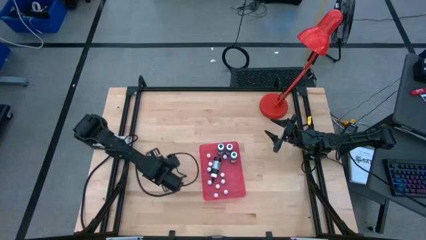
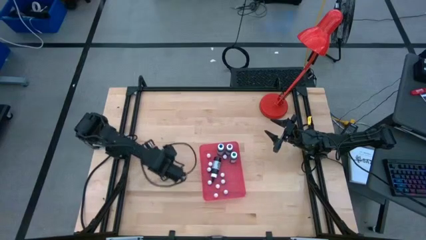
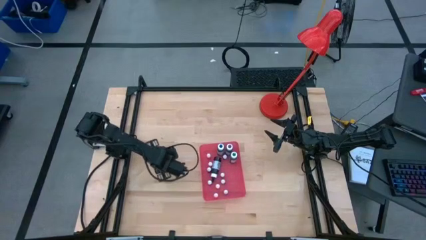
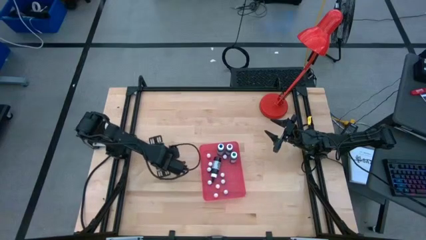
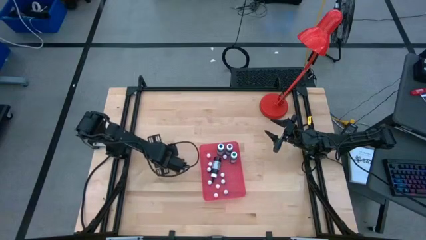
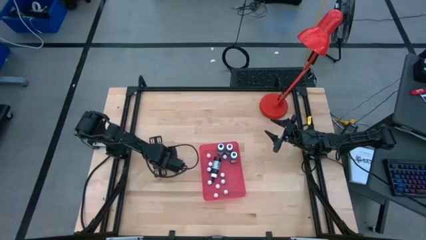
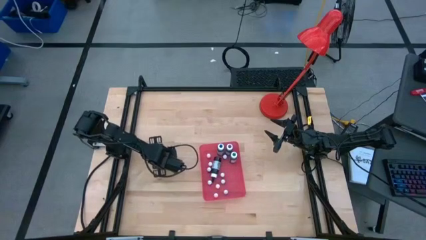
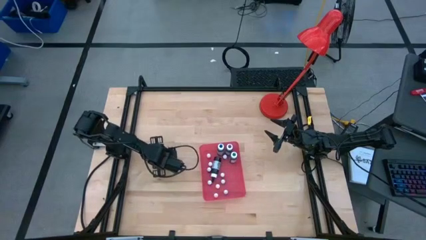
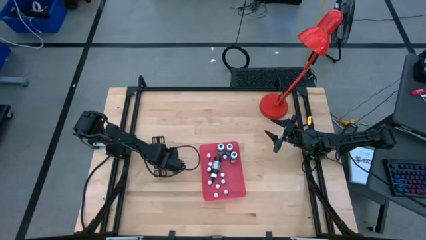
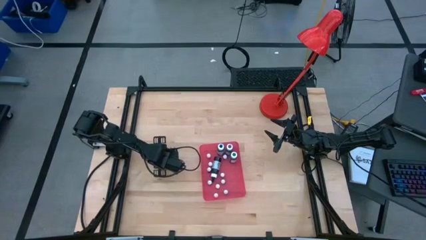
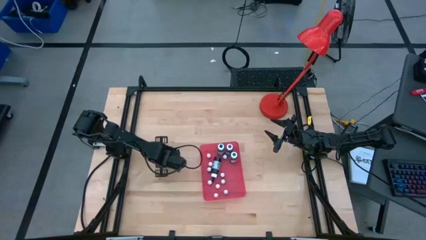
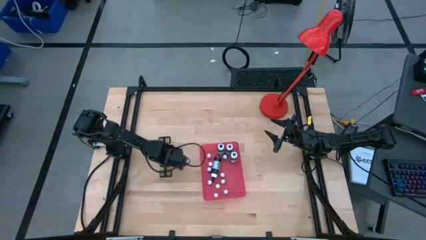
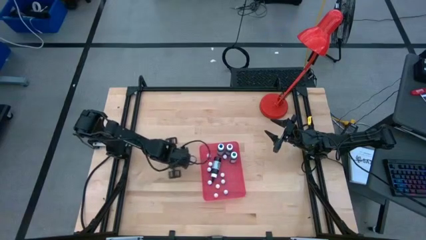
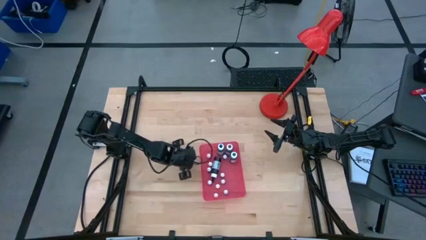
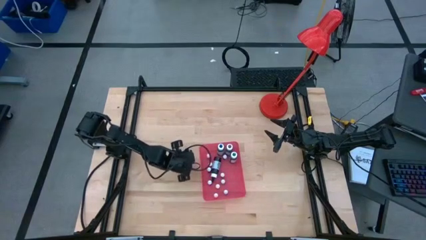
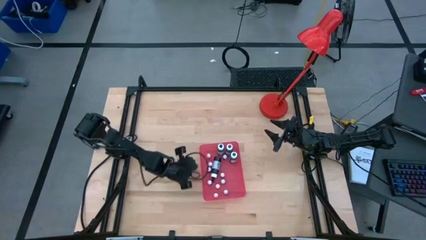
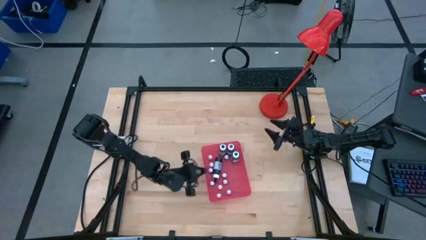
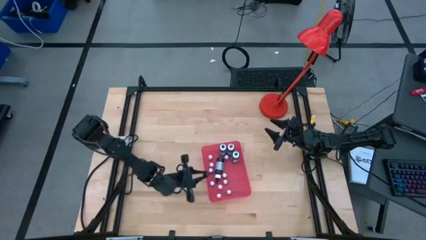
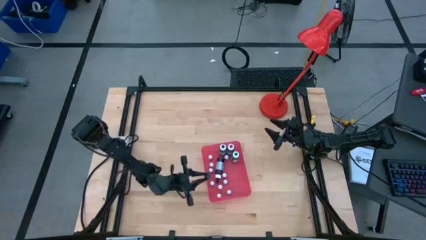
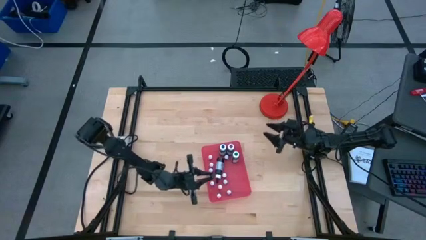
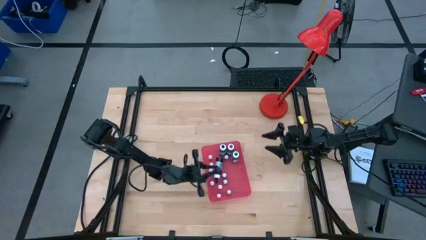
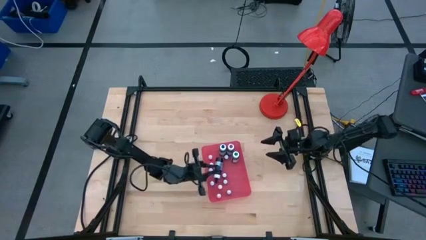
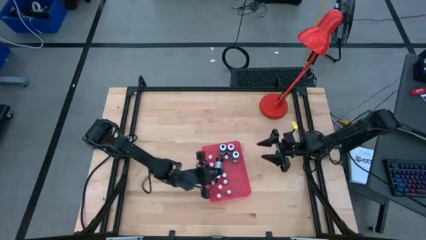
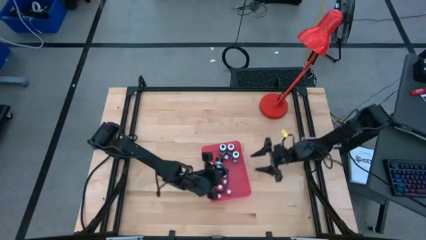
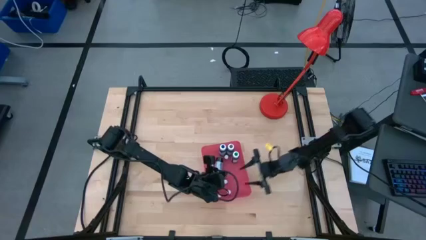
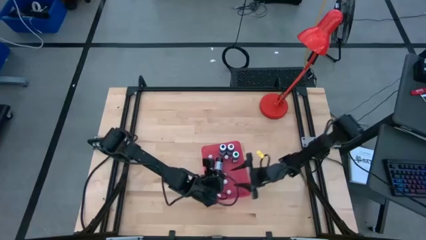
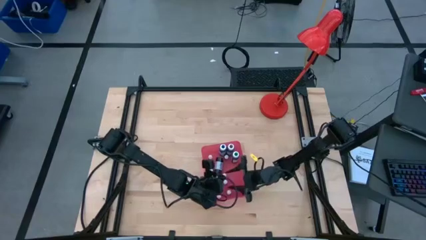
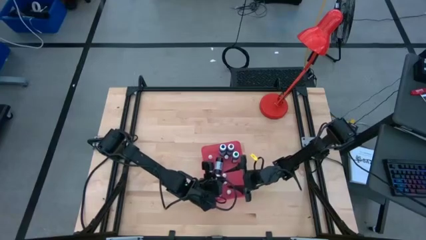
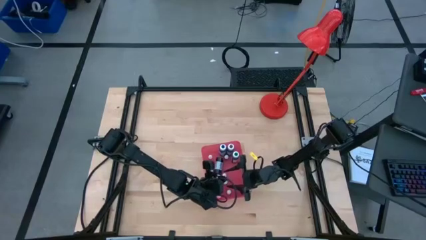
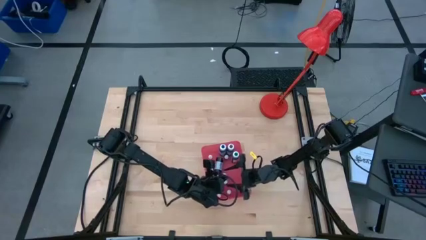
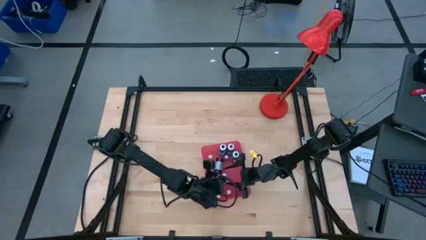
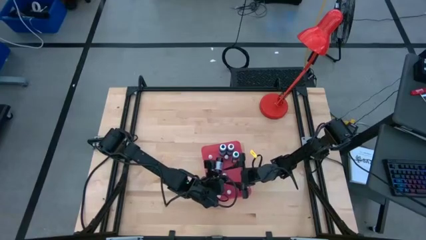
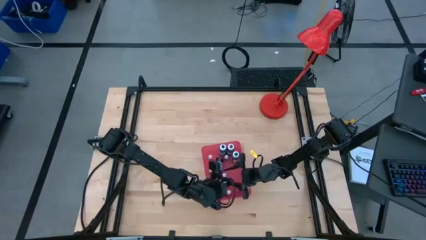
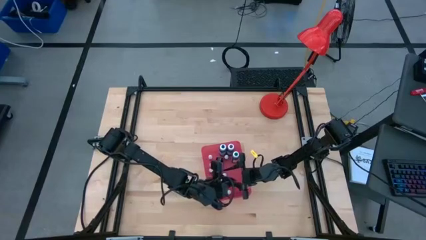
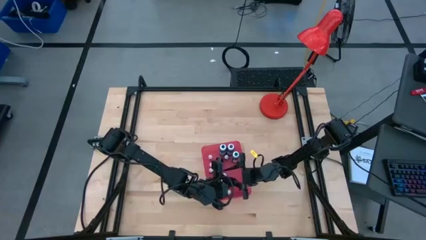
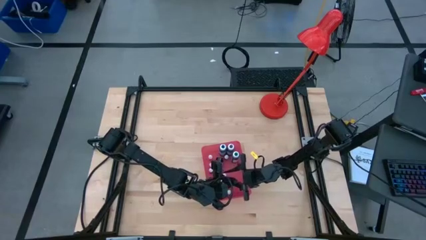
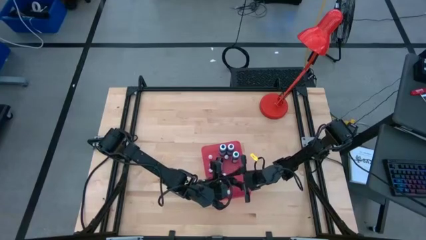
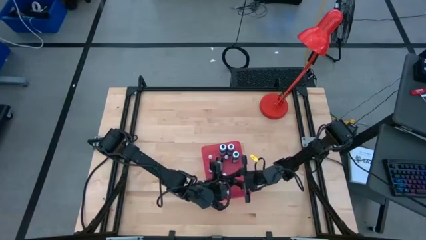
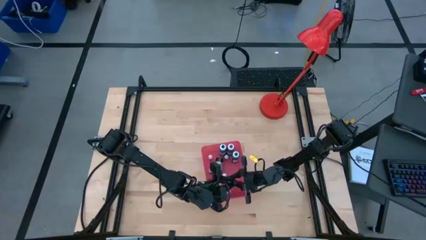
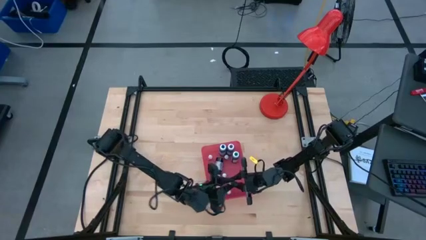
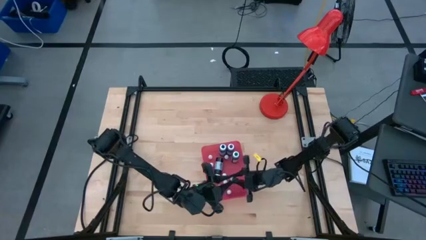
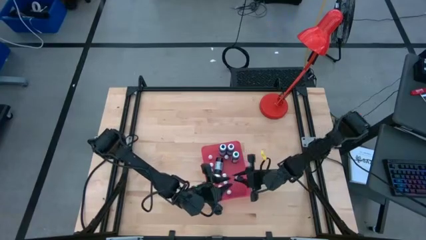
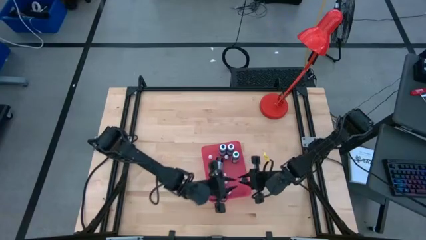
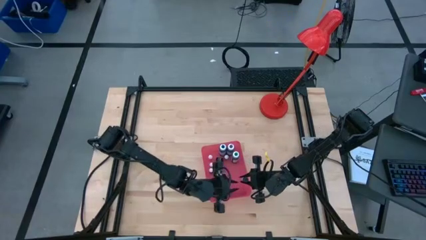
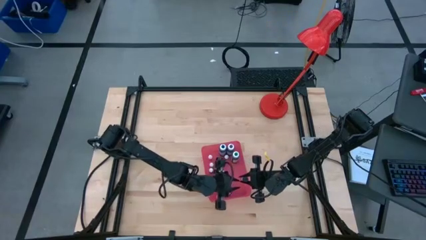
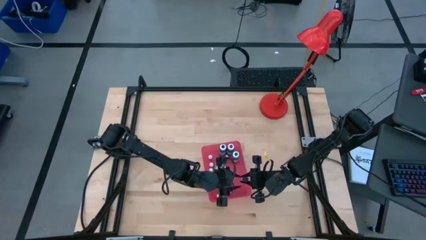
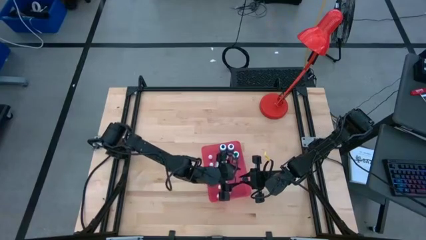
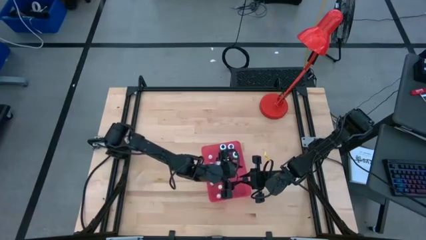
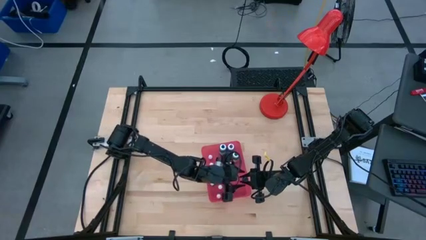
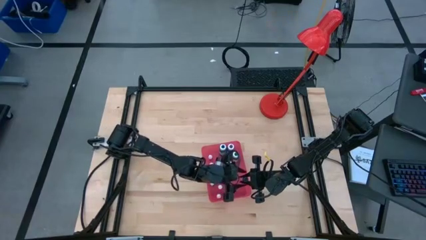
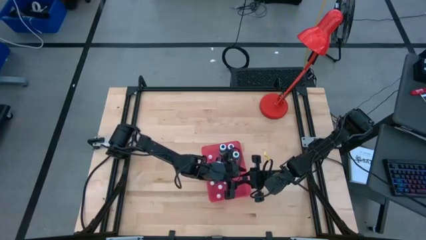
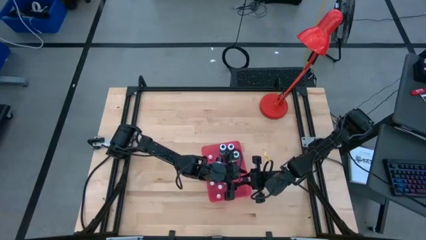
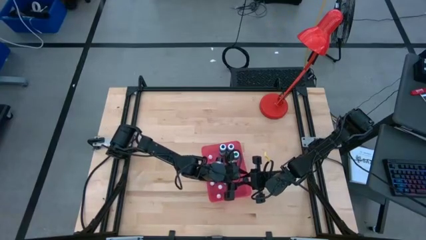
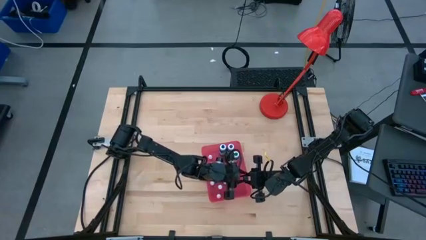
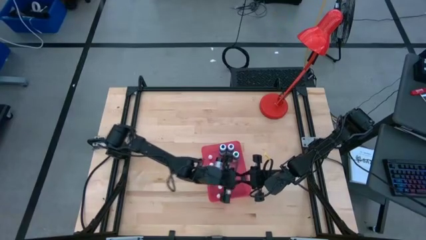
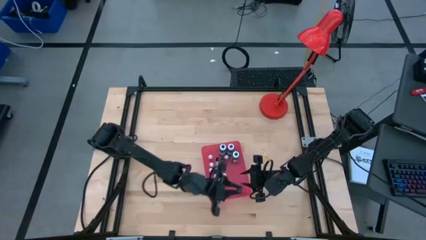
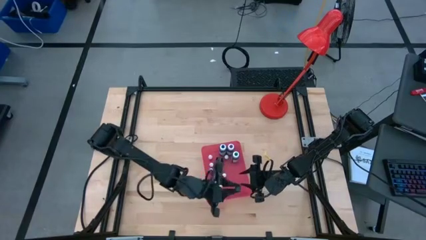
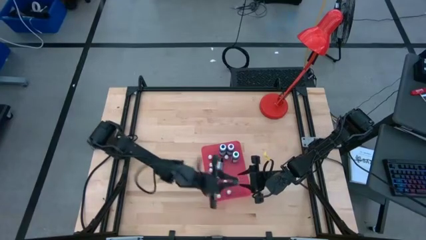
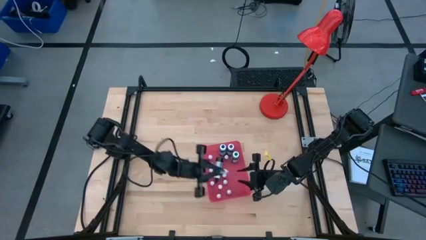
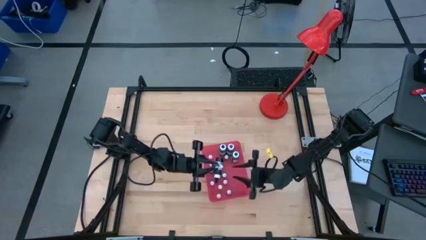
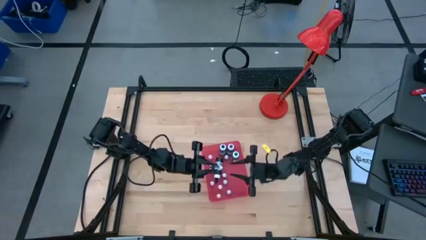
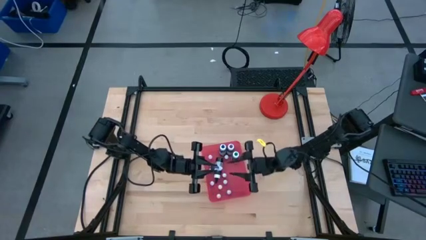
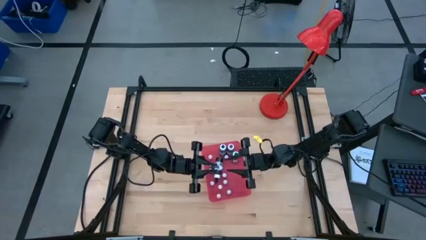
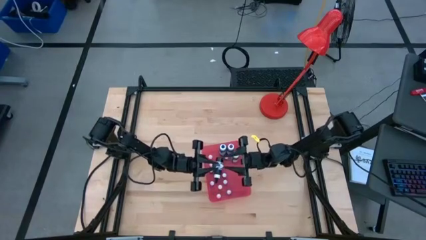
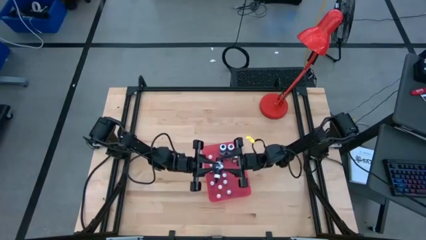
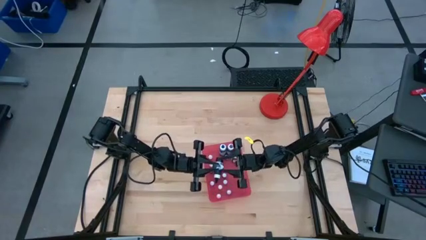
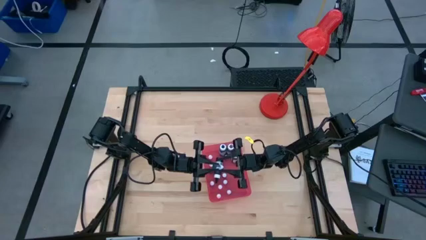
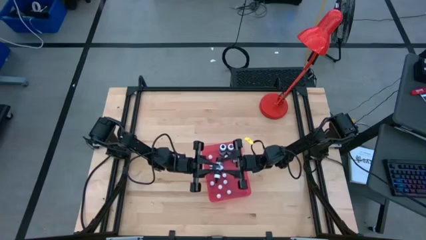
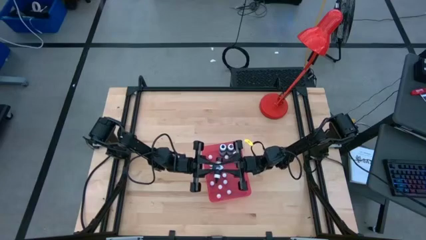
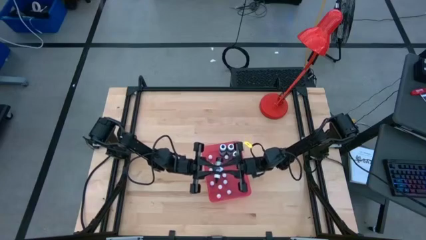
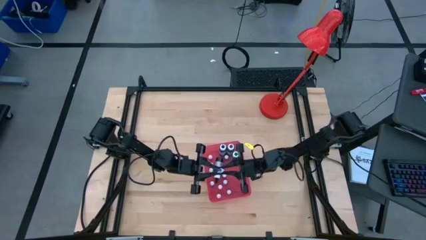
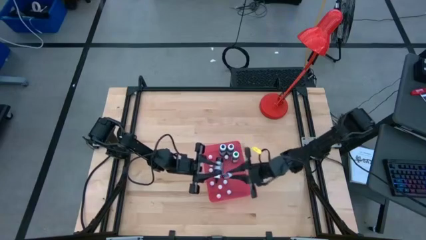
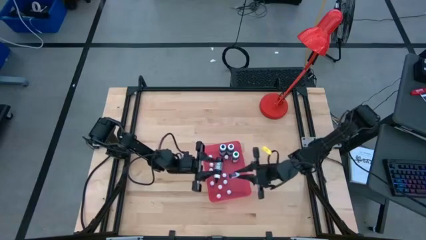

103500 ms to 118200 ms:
Task: Pick & Place food coloring
Put the small purple food coloring bottle into the red bin
